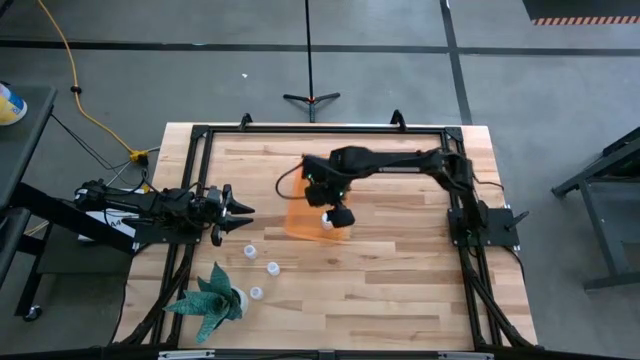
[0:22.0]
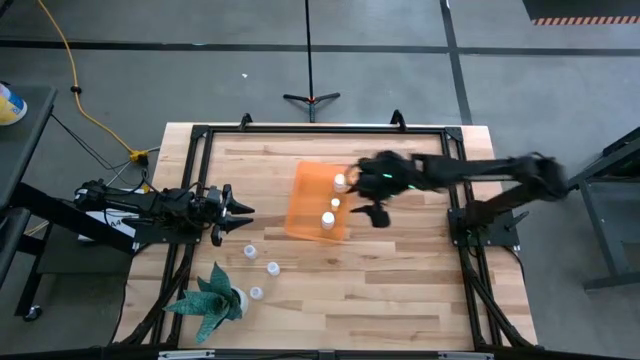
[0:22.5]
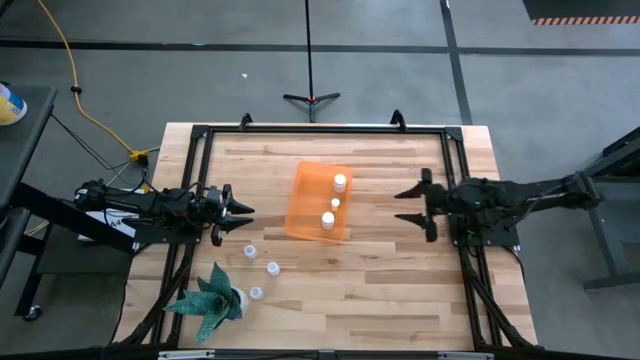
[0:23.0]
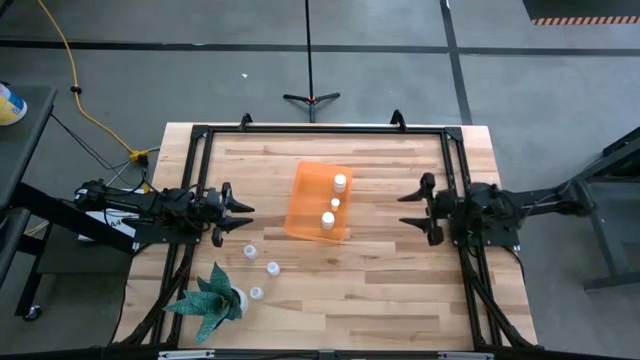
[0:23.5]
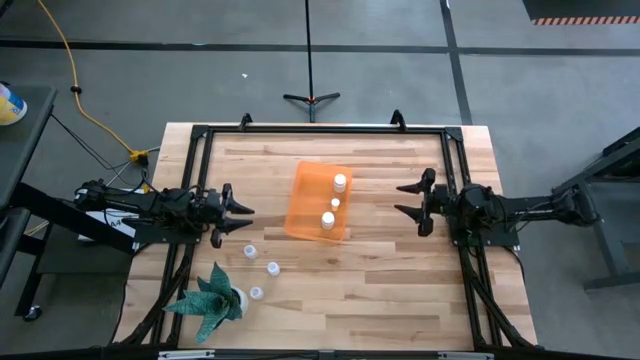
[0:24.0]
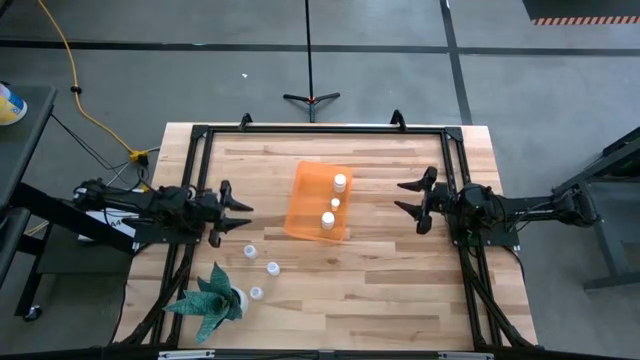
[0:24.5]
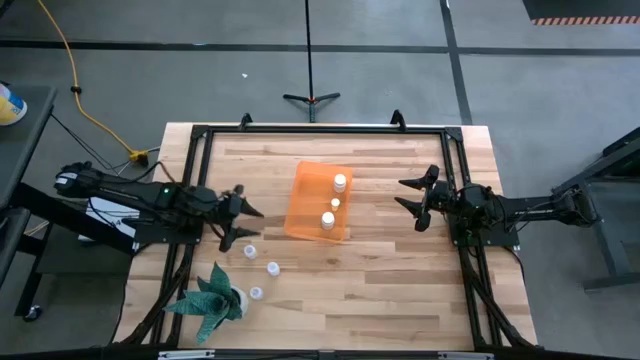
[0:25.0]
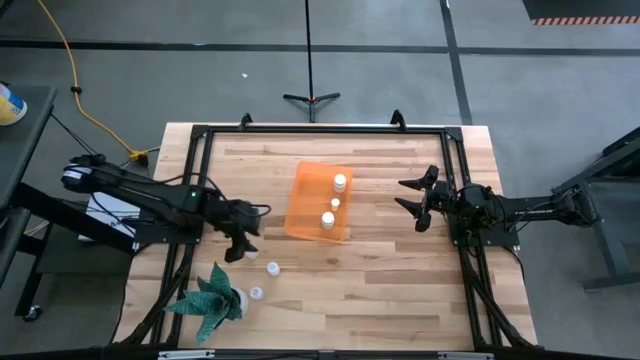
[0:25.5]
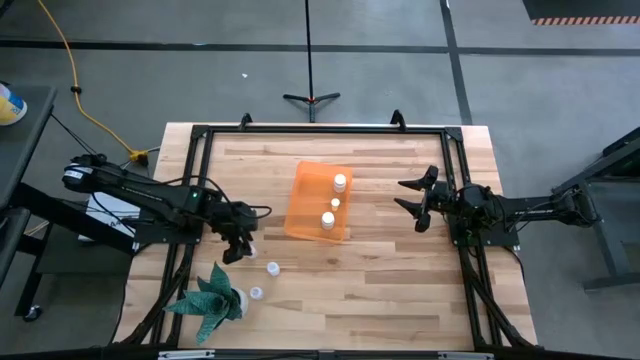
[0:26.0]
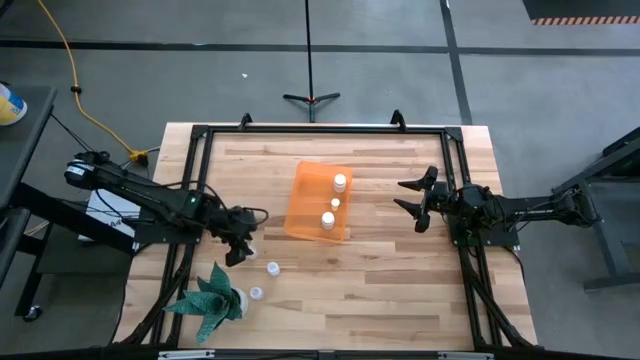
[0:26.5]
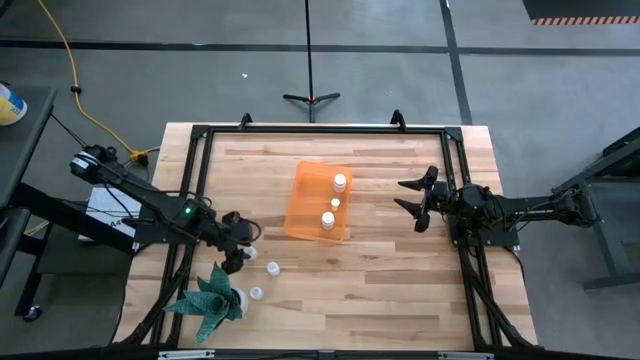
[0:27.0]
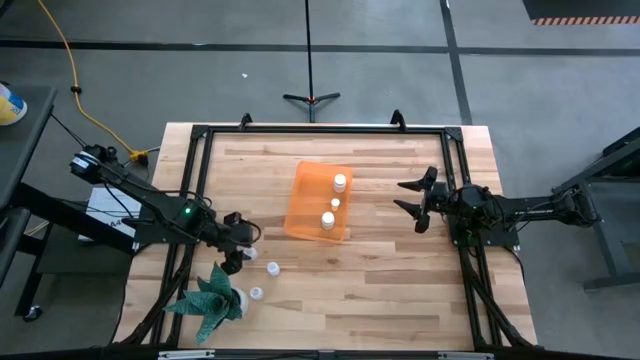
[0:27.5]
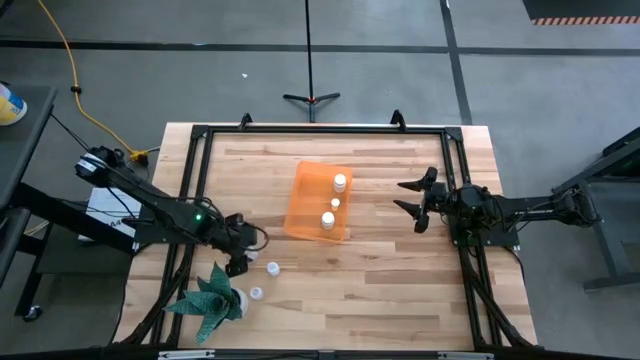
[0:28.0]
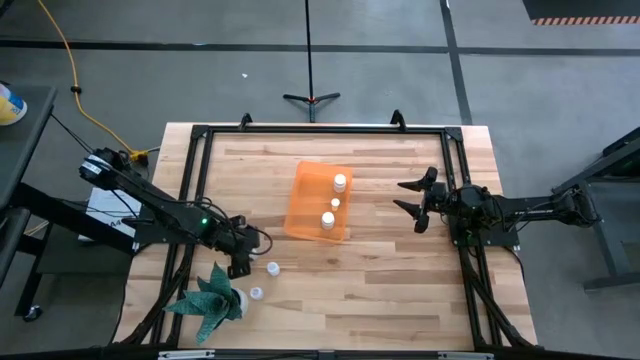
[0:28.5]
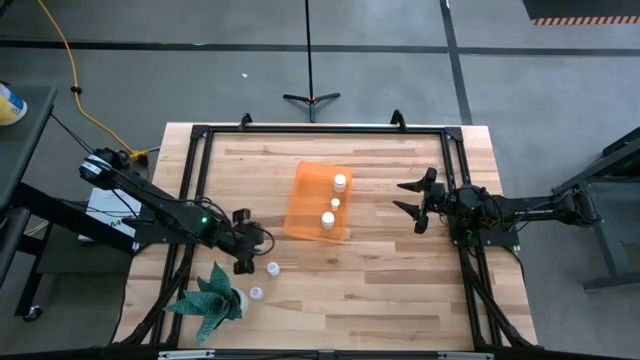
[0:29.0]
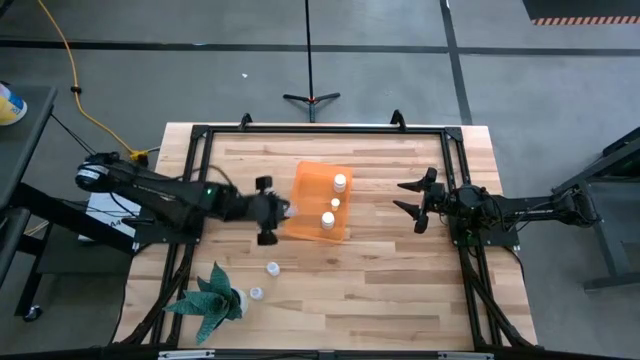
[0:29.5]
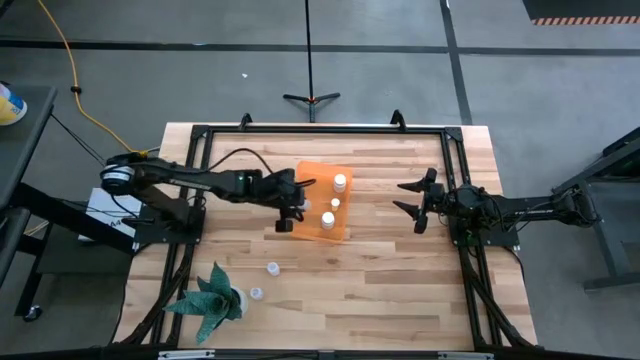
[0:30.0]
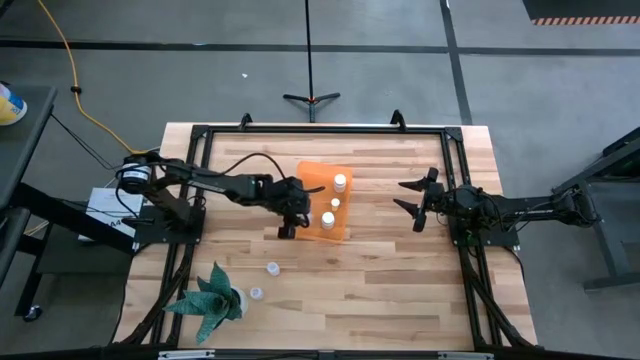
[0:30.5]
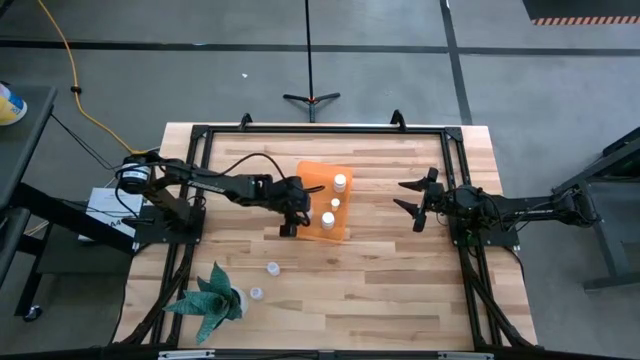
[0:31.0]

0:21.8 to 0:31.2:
Task: Pick and place pill bottles into a basket
Put the top left transparent pill bottle into the orange bin

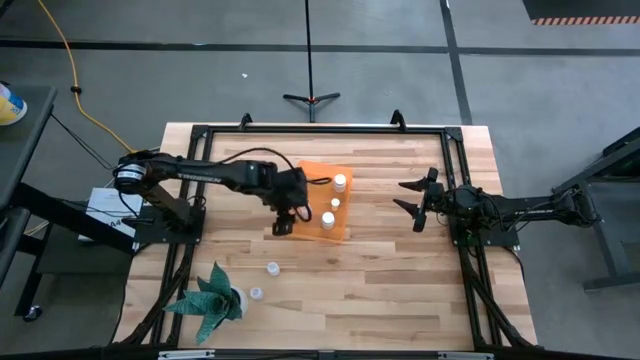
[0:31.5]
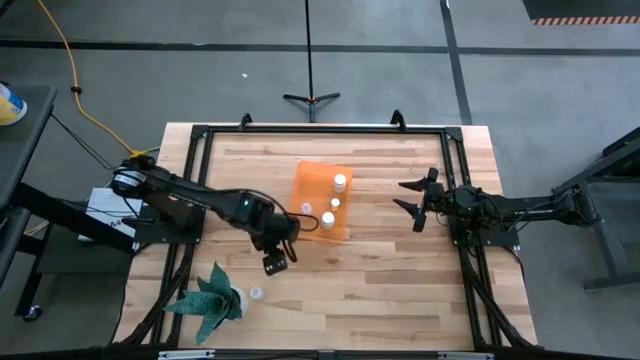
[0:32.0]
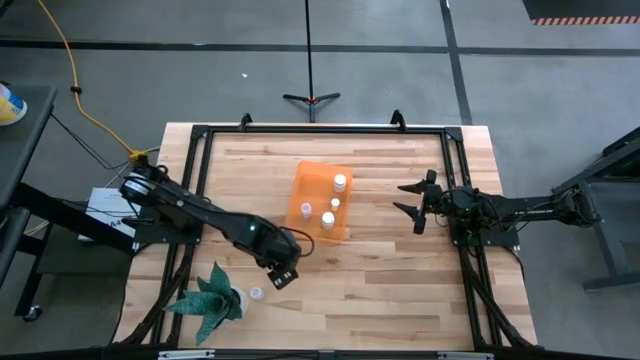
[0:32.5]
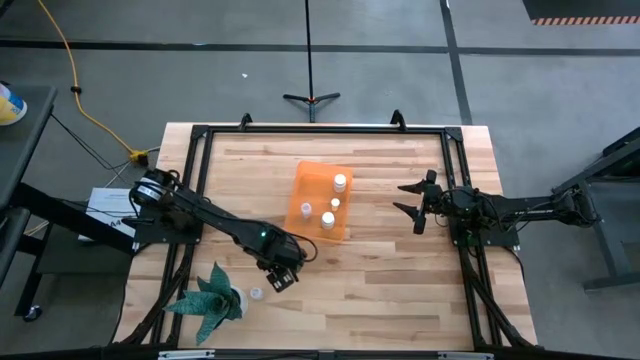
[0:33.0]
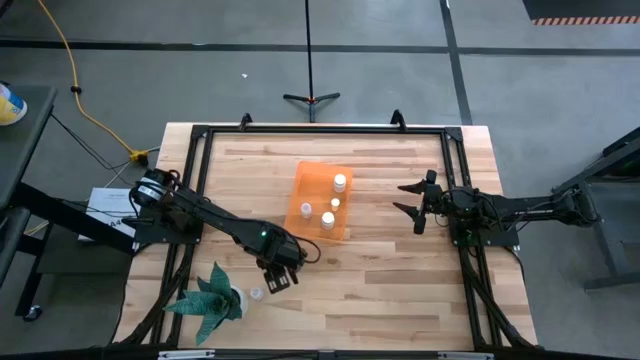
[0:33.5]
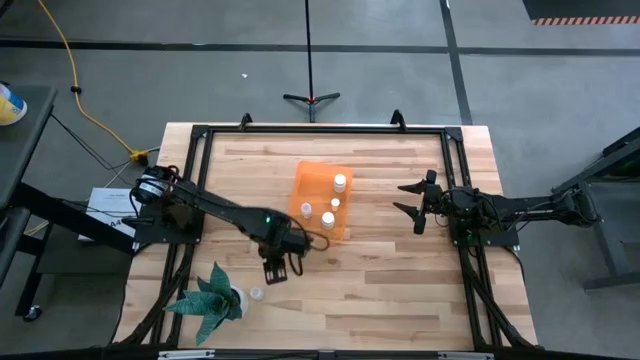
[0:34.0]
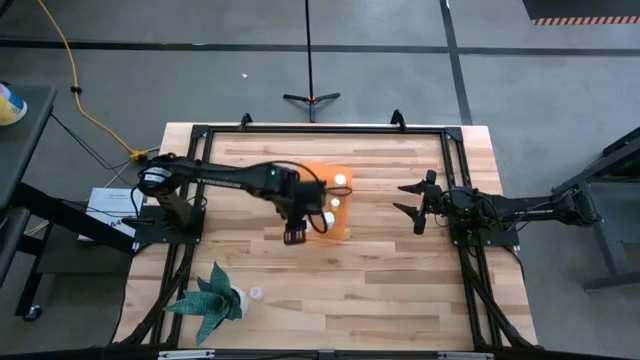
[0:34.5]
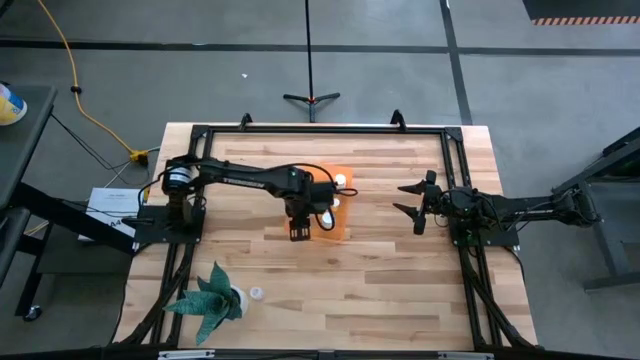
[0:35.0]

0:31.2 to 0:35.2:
Put the right transparent pill bottle into the orange bin

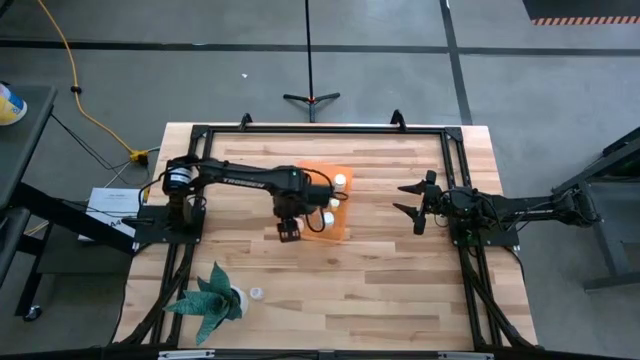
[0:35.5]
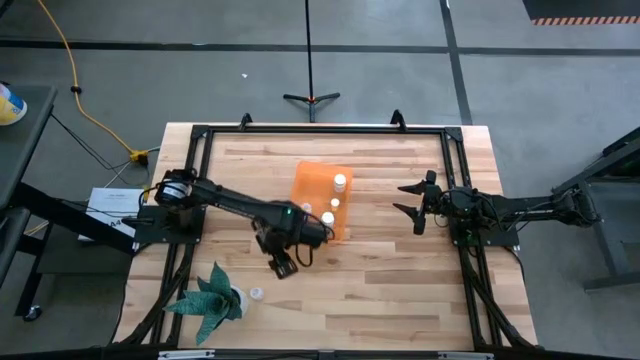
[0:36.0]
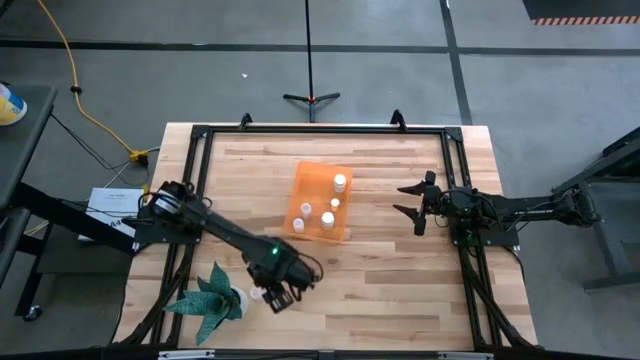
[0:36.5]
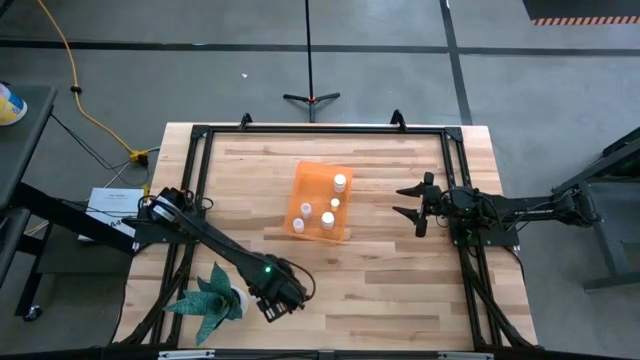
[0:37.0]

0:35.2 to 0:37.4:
Put the transparent pill bottle into the orange bin

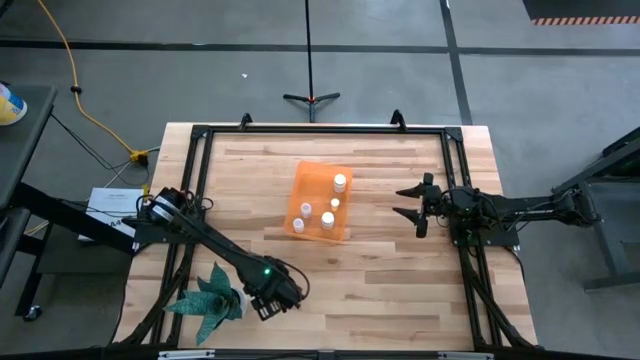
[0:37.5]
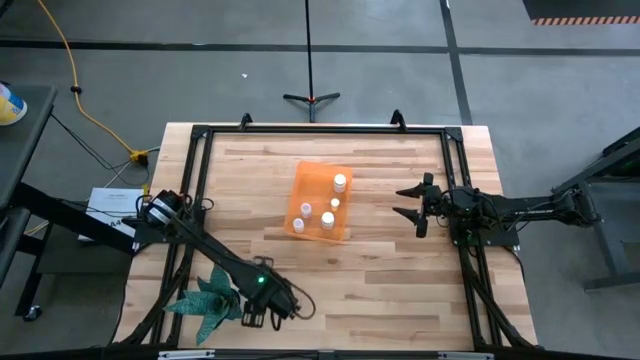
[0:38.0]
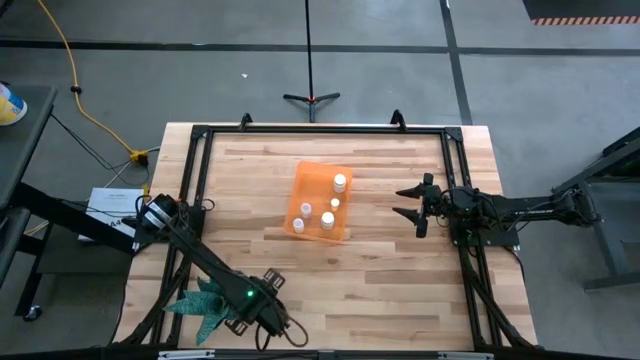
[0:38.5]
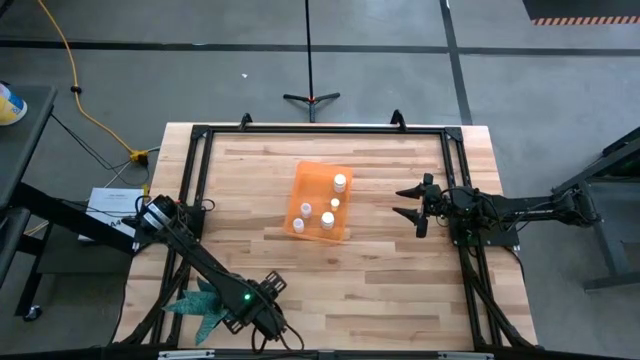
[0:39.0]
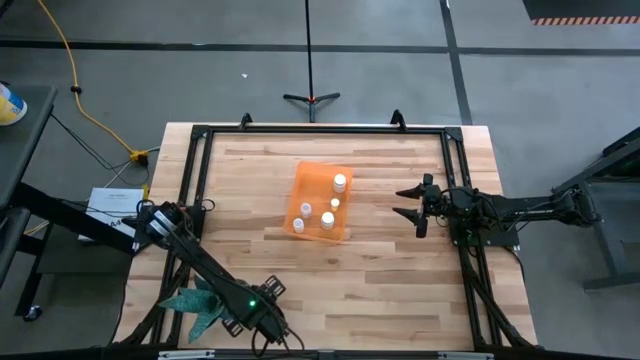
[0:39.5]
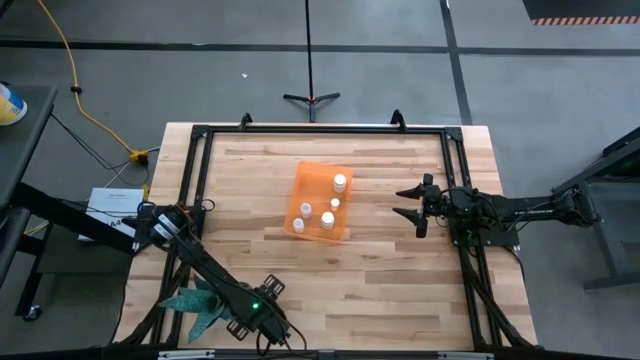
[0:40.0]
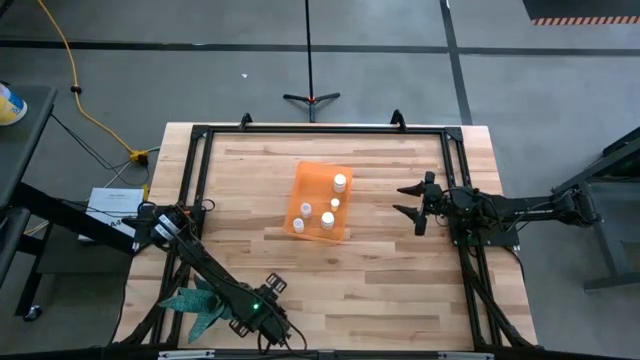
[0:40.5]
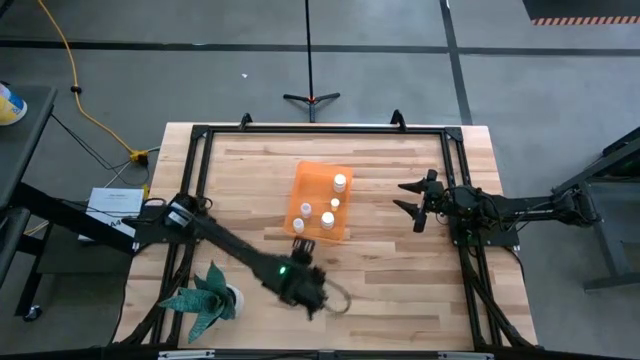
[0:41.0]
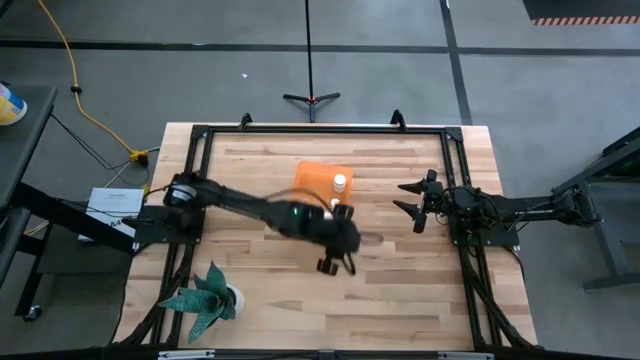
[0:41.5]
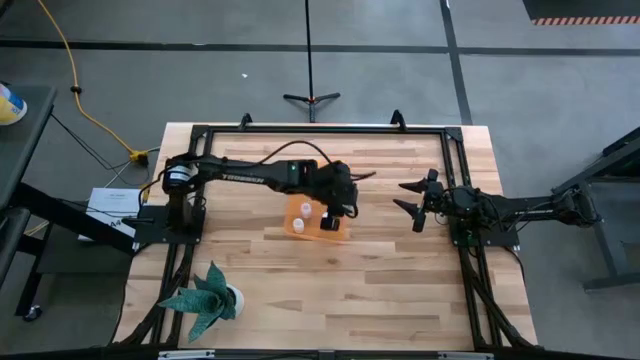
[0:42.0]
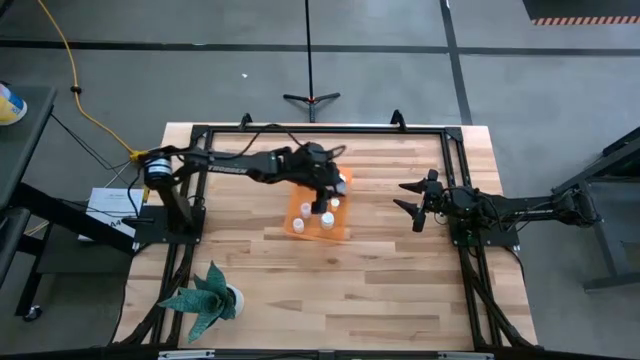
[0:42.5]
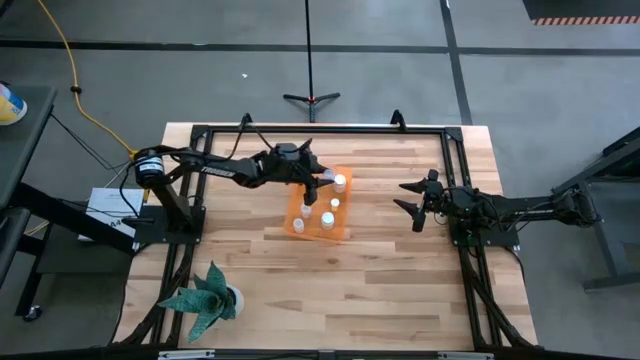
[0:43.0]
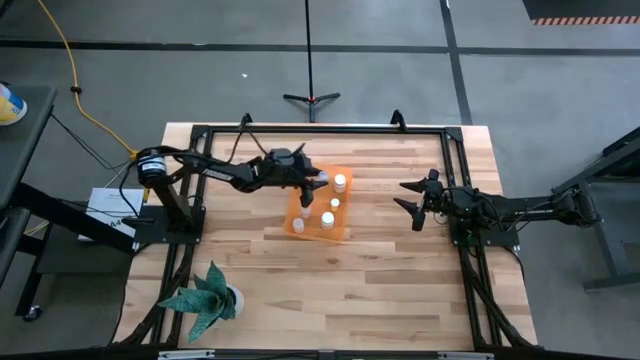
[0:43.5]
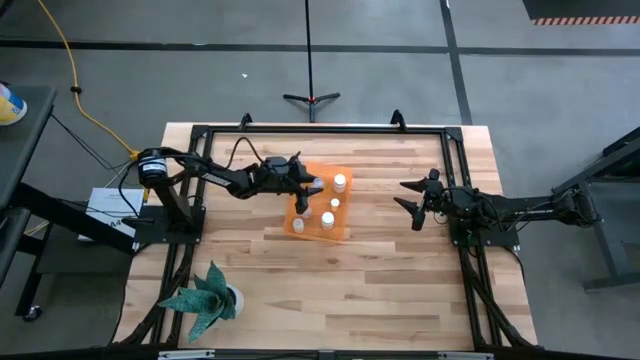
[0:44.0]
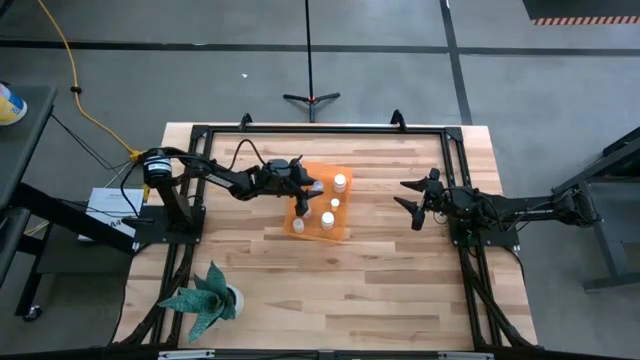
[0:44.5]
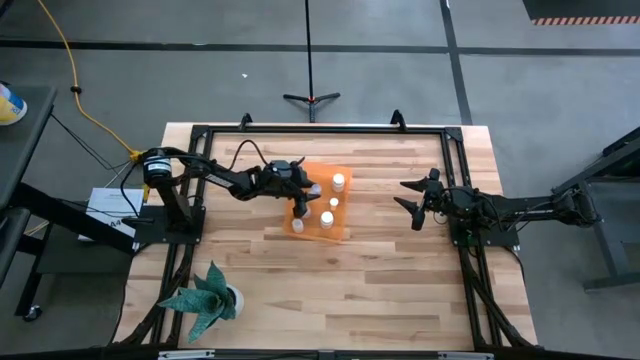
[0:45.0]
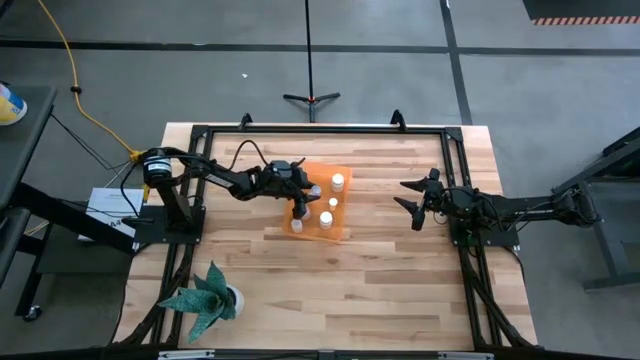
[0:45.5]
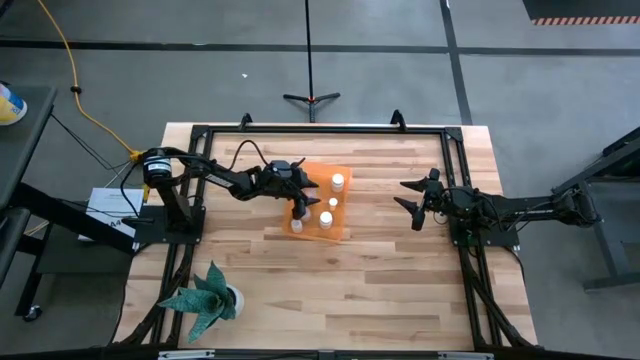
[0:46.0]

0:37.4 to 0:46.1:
Put the transparent pill bottle into the orange bin
